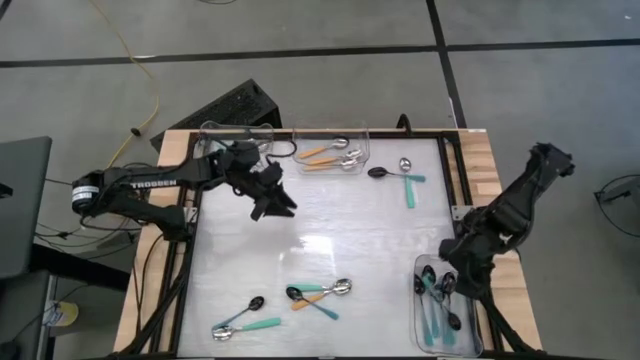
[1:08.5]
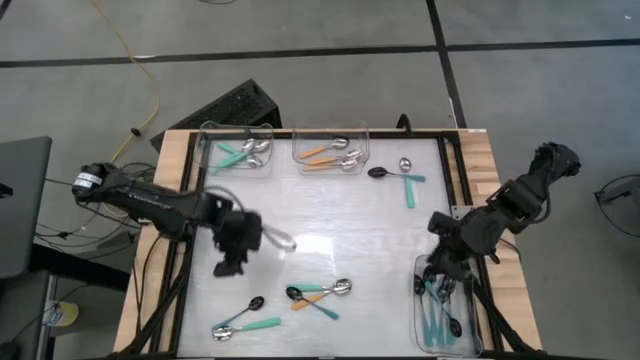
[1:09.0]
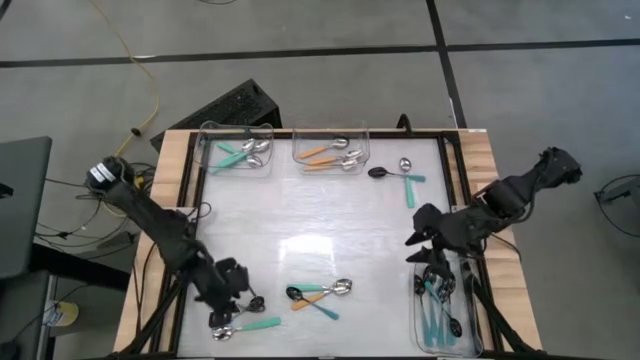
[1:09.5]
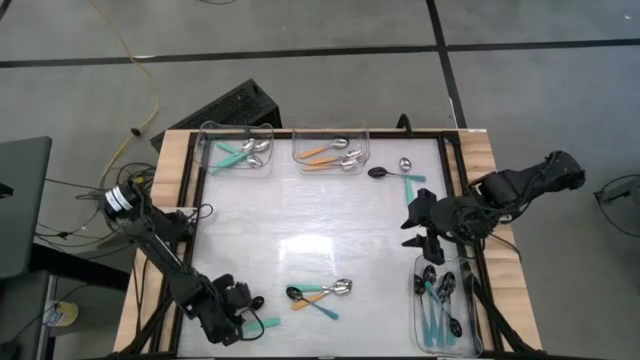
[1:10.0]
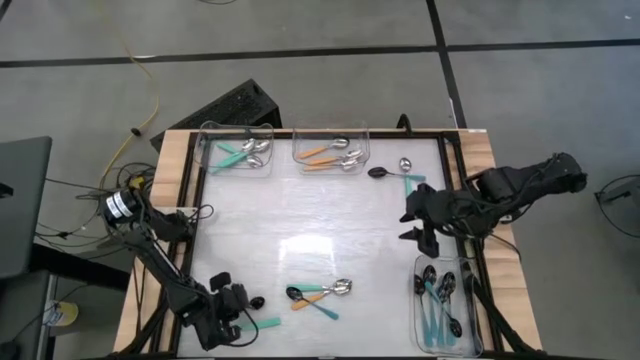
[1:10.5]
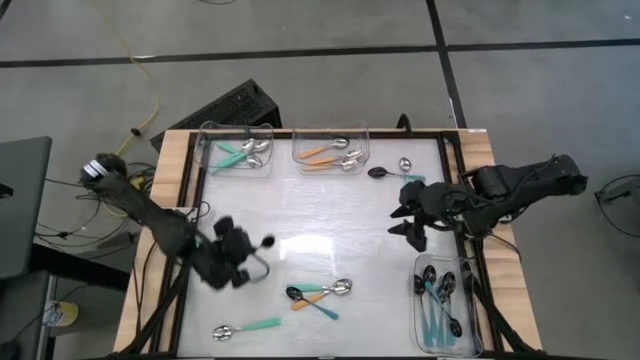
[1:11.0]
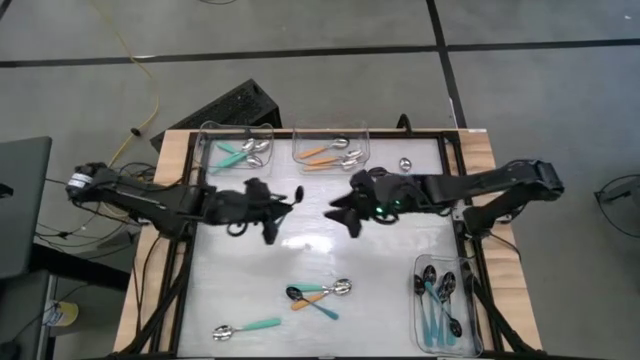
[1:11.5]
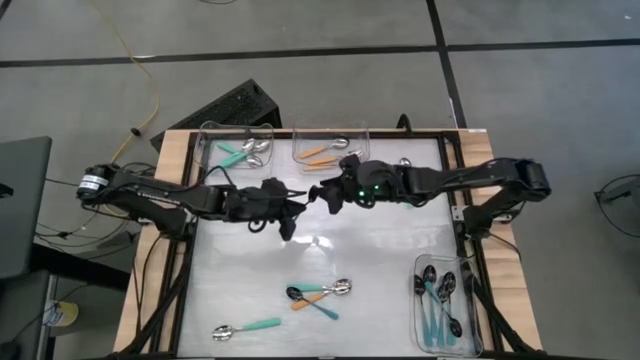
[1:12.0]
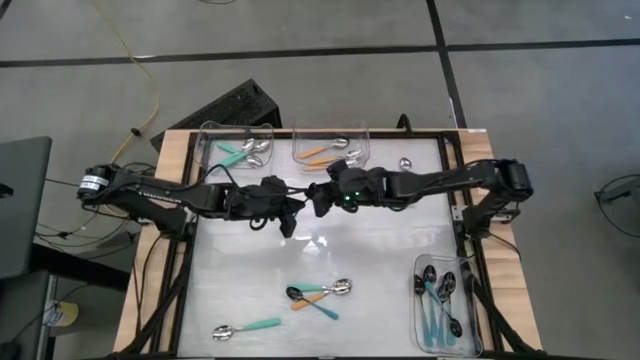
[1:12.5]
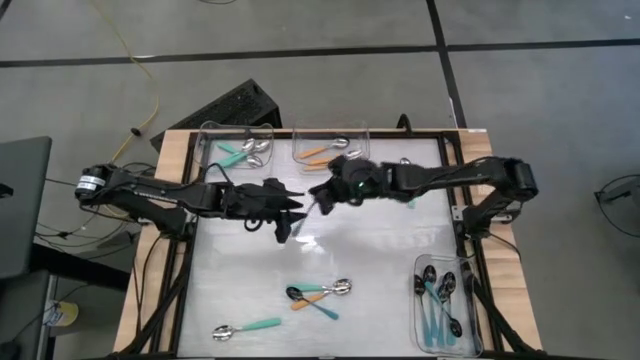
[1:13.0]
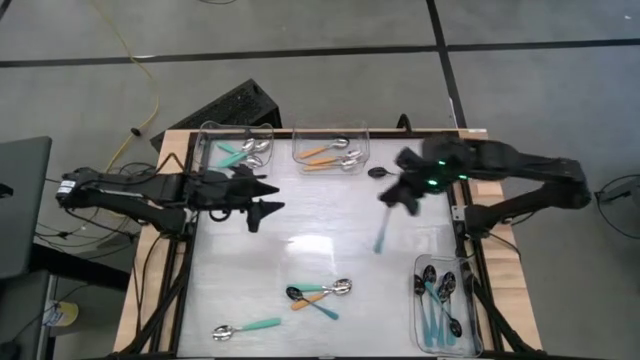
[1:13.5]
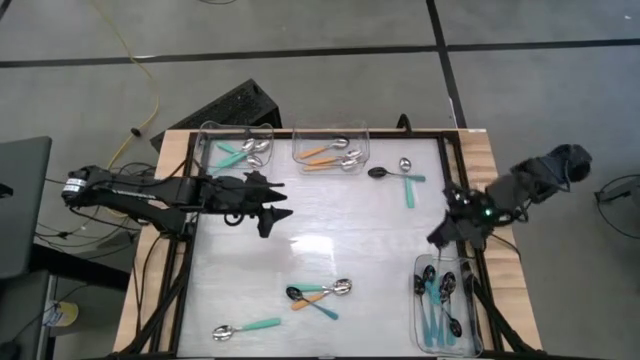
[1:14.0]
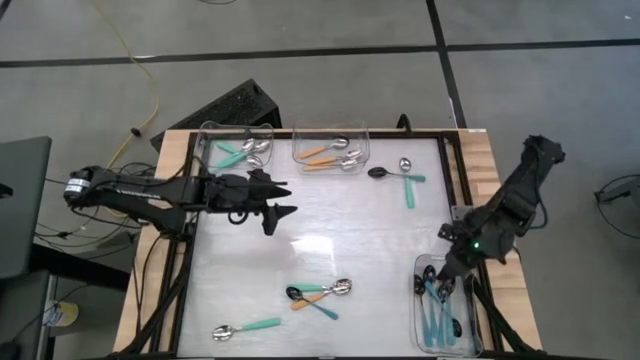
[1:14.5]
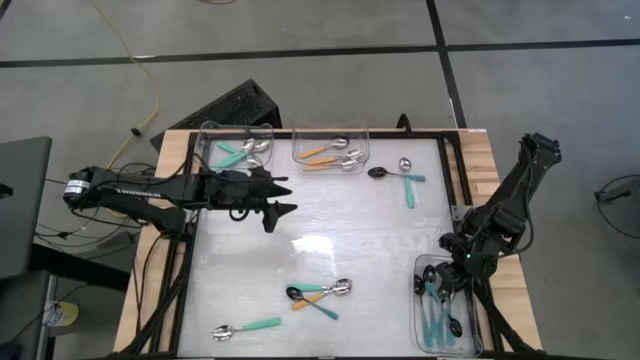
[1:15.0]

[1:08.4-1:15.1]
Task: Sort silverware by color (type)
Put the blue spoon into the bottom transparent bin

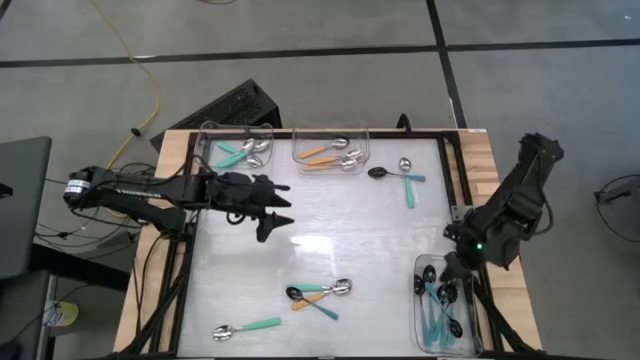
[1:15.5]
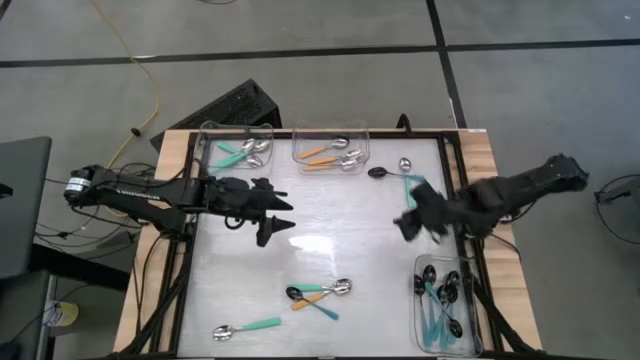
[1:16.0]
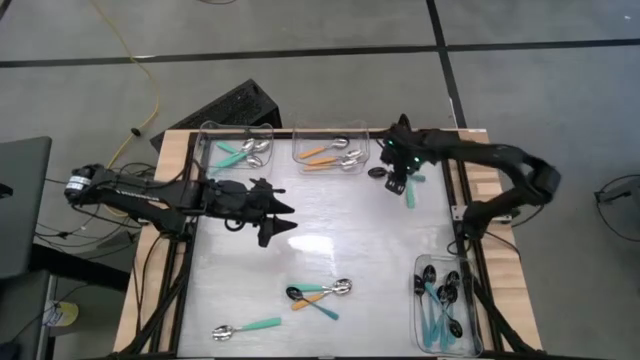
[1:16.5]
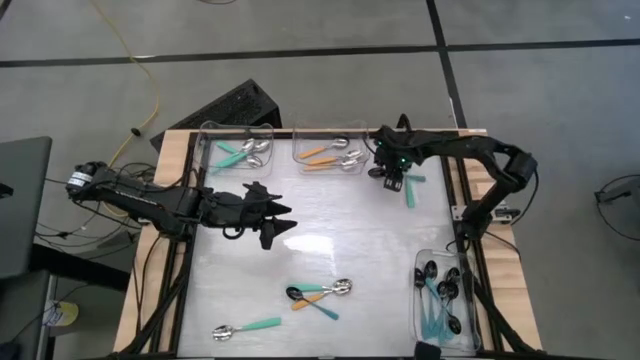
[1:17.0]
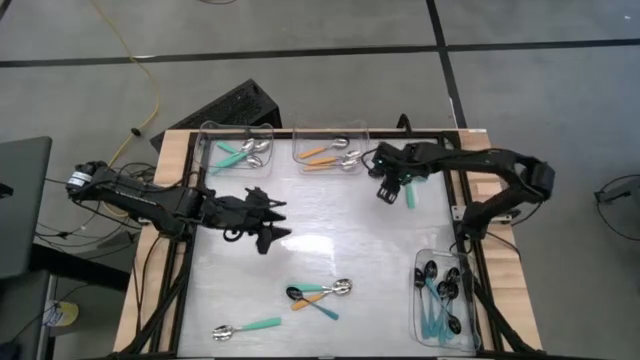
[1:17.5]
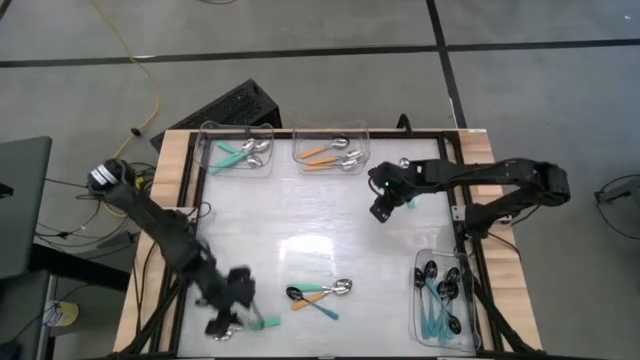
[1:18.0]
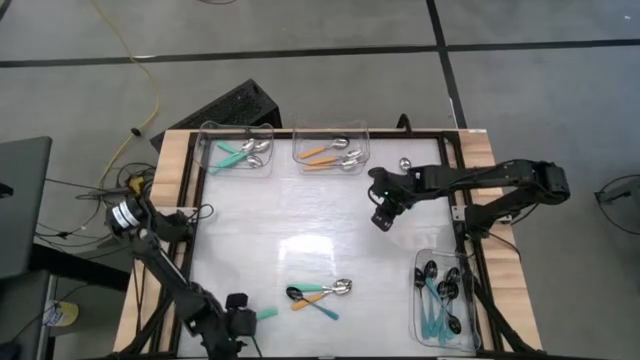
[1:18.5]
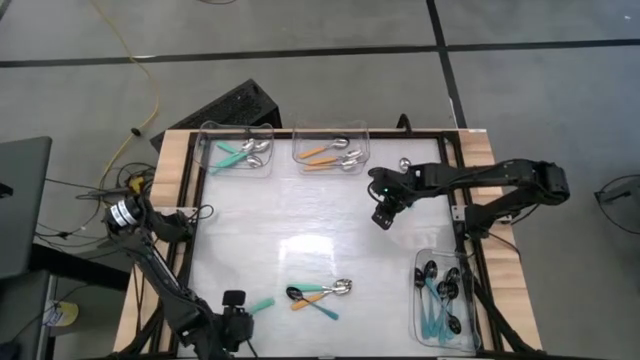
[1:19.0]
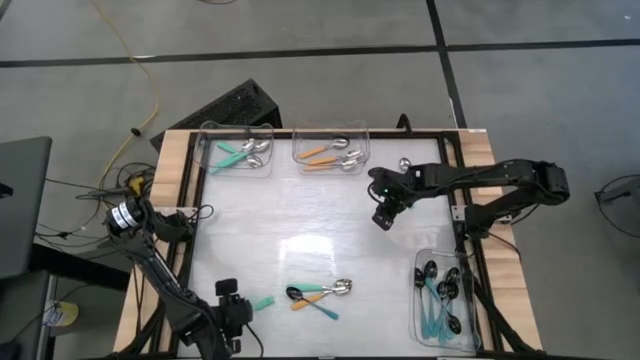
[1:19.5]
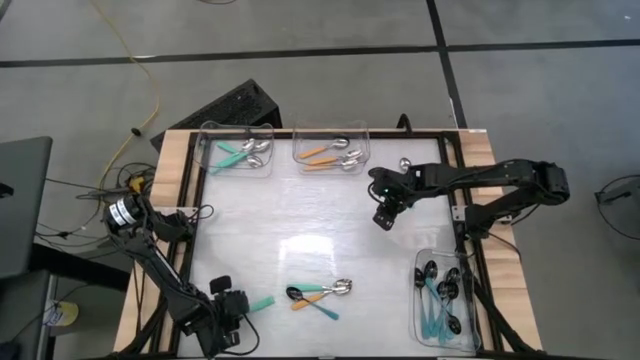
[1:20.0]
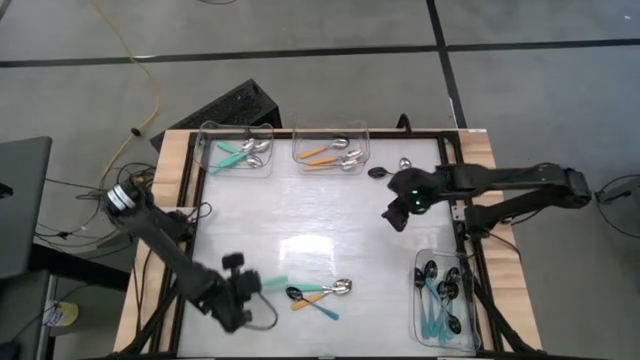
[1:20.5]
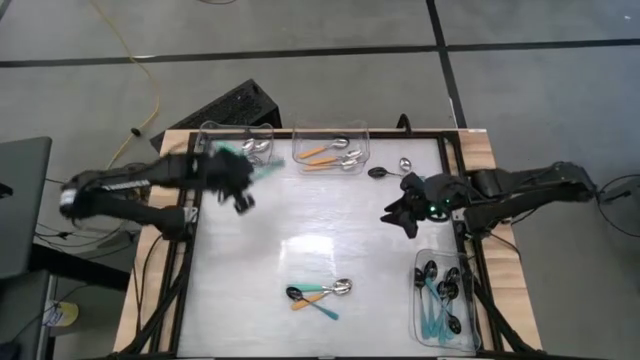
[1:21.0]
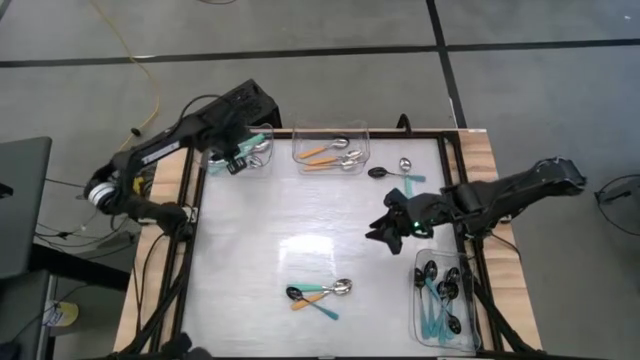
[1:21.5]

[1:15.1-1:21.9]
Put the green spoon into the top left transparent bin

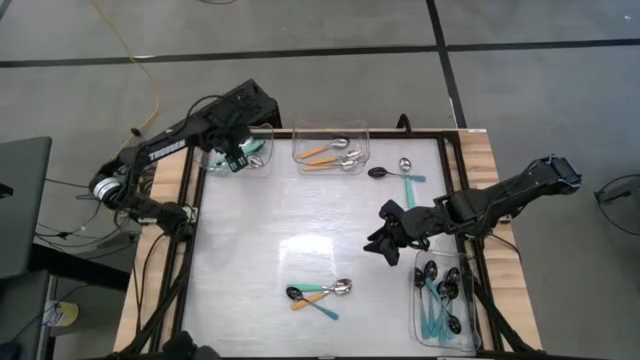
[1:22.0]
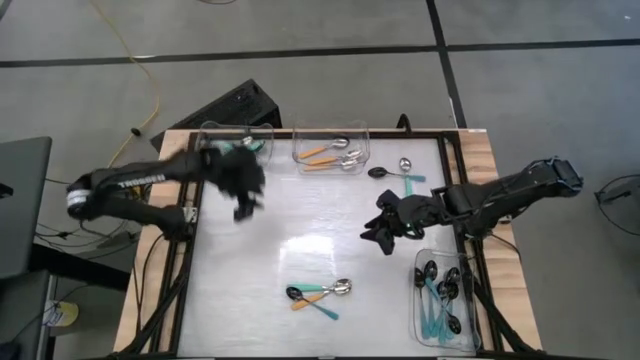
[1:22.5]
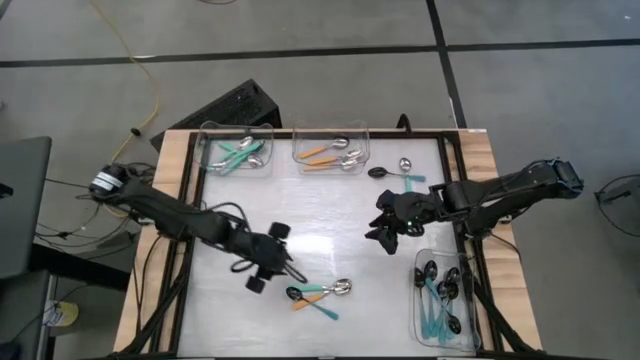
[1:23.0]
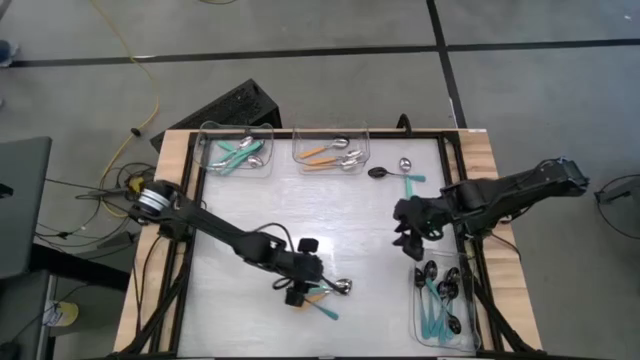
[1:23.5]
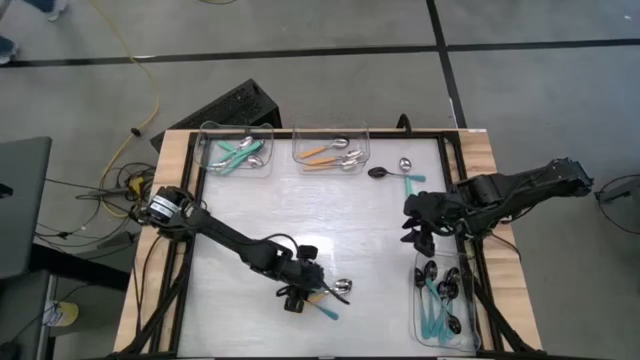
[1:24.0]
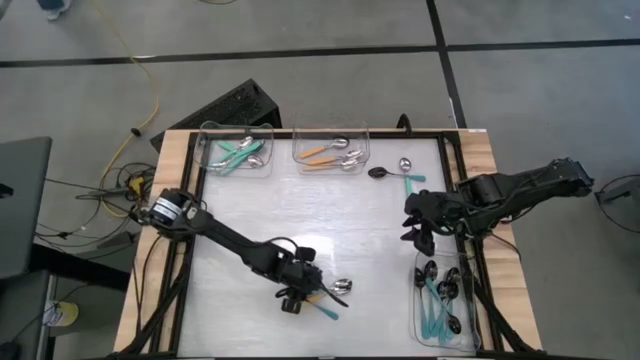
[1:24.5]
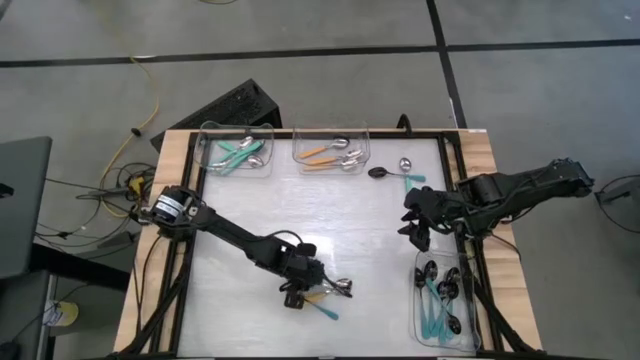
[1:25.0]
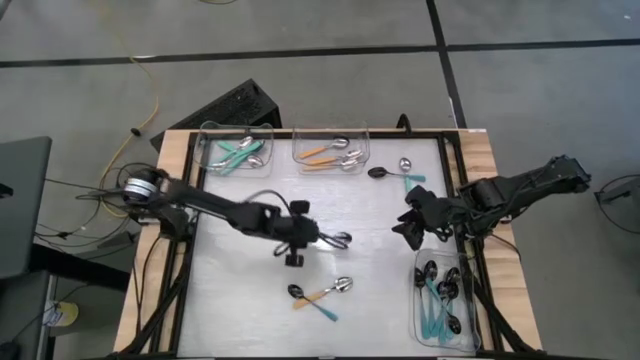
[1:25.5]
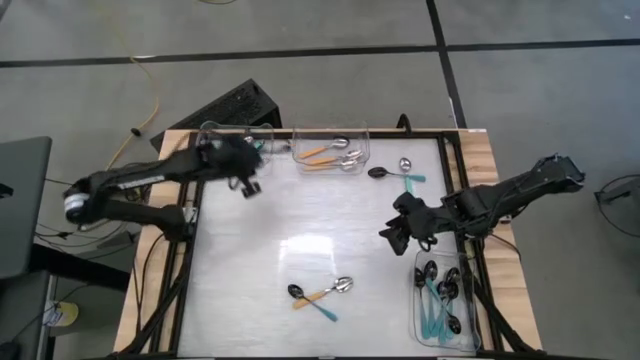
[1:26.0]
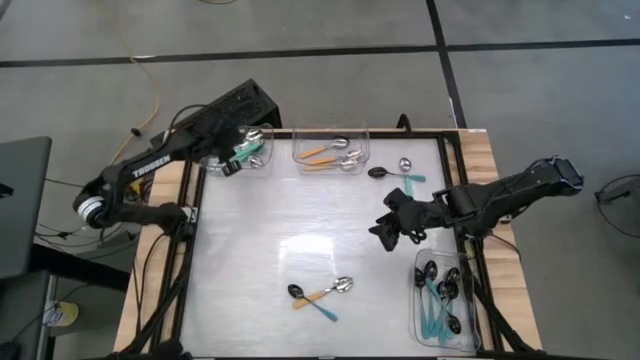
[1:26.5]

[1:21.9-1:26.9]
Put the green spoon into the top left transparent bin

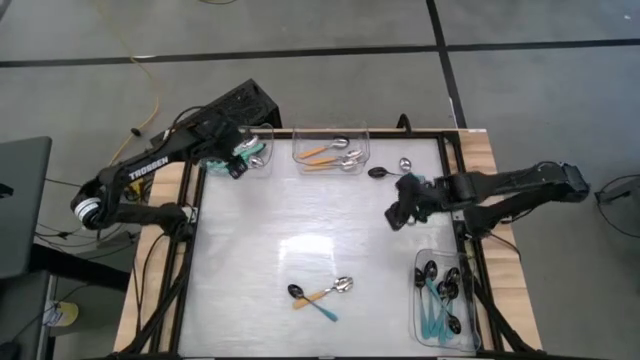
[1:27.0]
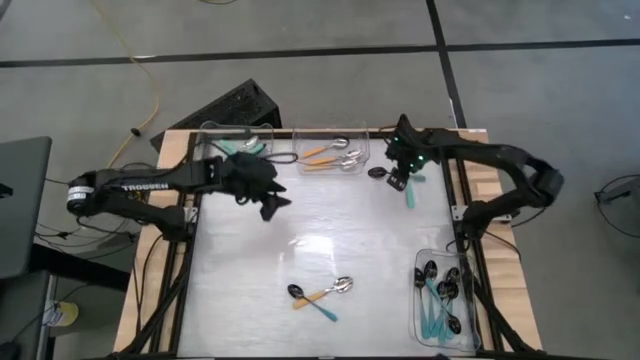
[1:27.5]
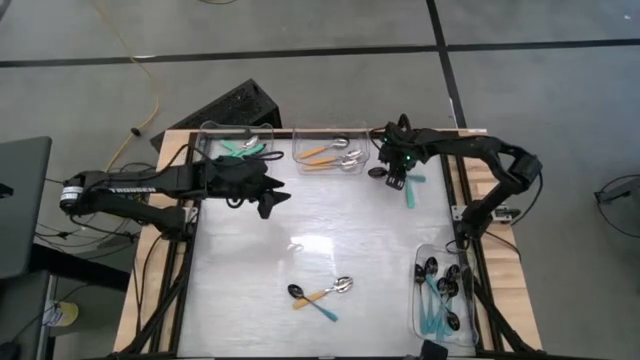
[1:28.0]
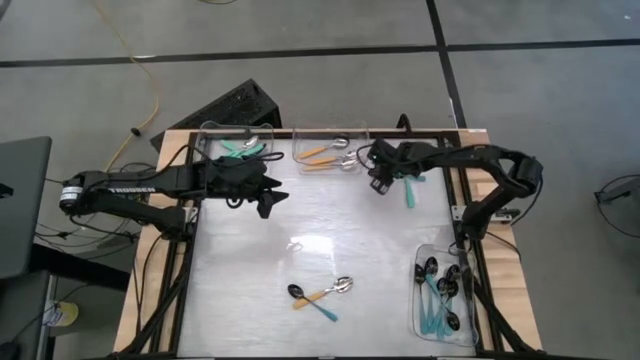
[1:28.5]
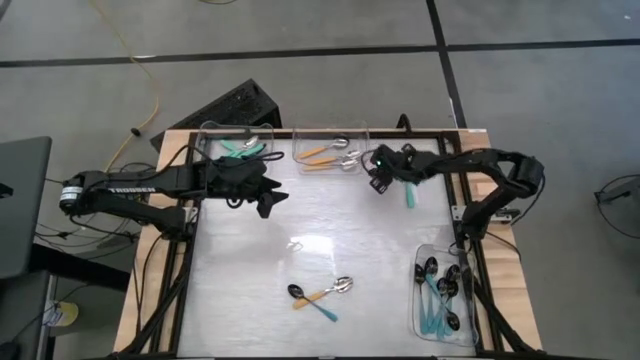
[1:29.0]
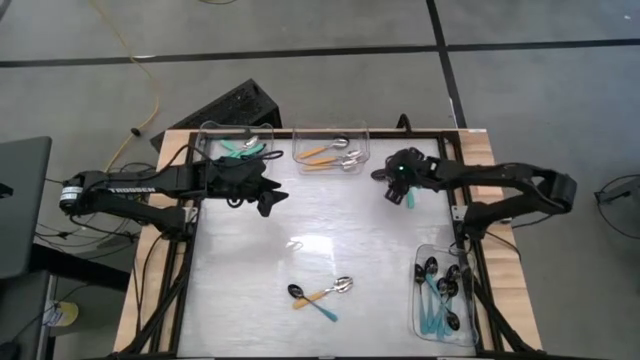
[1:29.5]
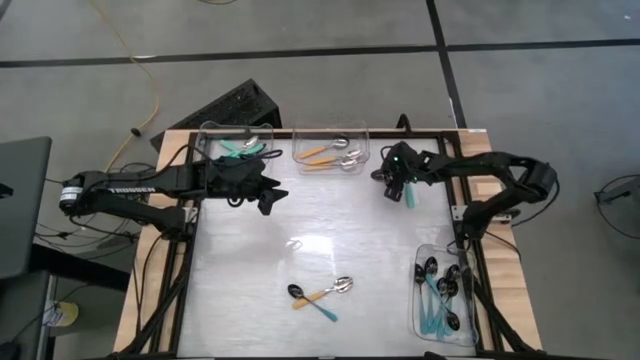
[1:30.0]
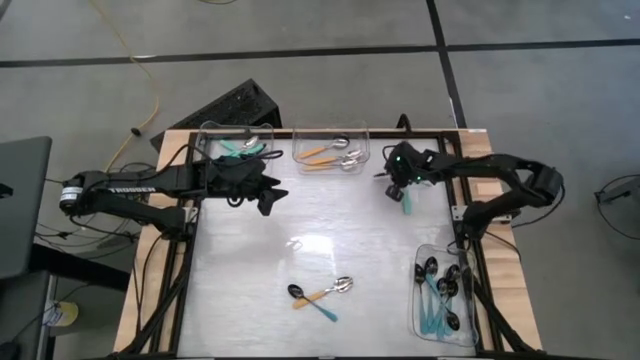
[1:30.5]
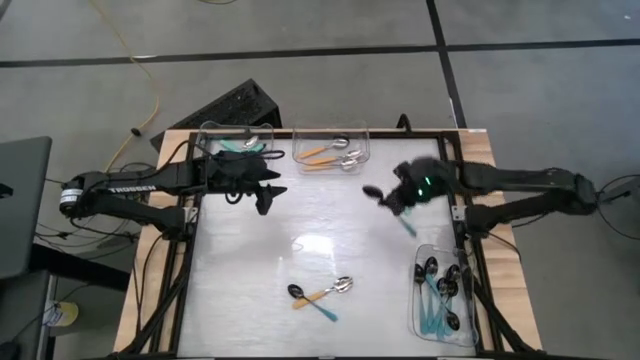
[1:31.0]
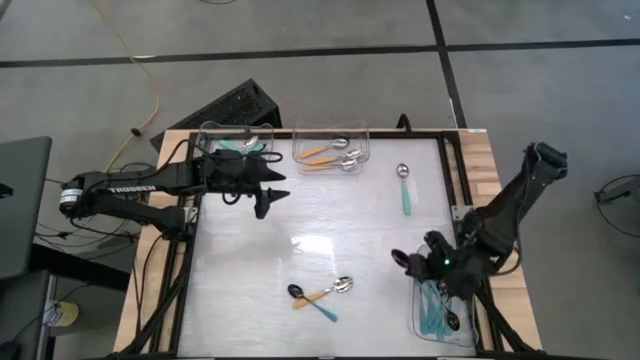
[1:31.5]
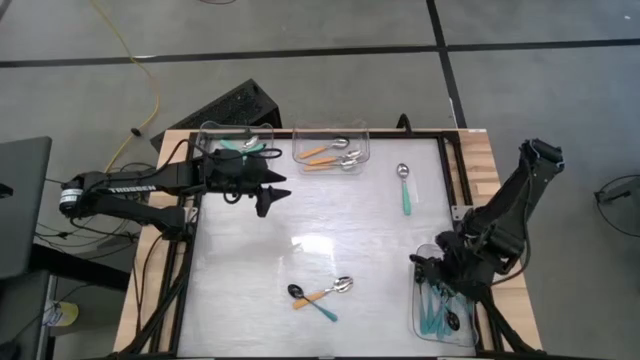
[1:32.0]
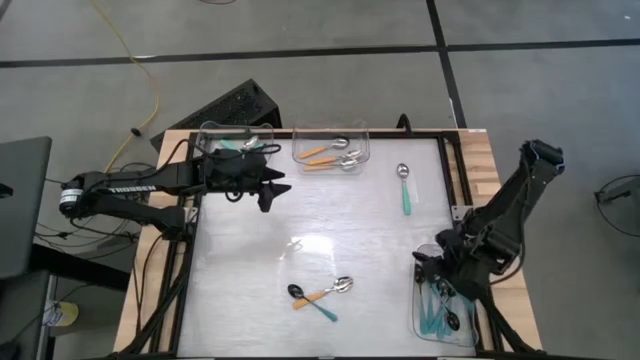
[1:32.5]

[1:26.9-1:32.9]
Put the blue spoon into the bottom transparent bin
